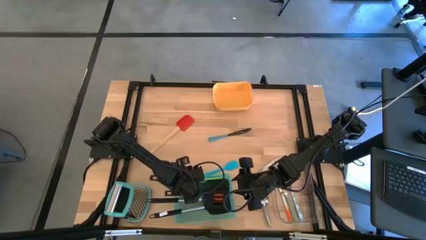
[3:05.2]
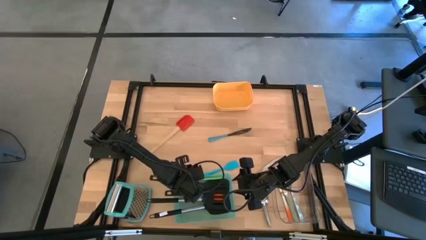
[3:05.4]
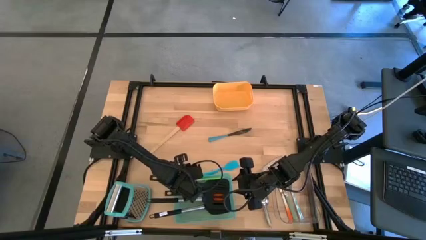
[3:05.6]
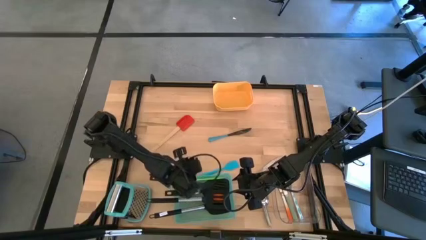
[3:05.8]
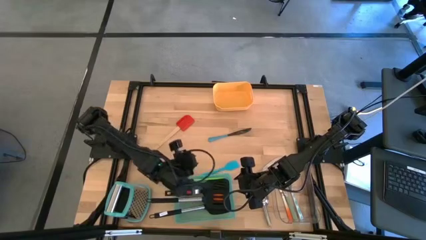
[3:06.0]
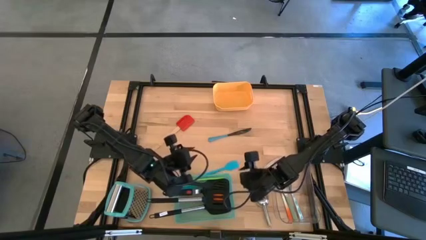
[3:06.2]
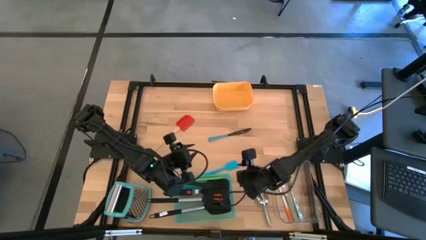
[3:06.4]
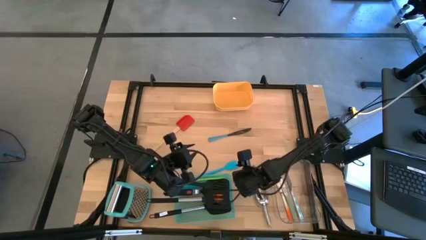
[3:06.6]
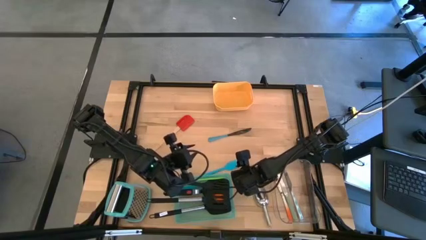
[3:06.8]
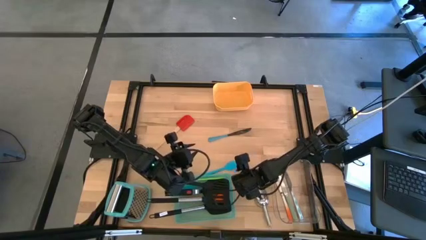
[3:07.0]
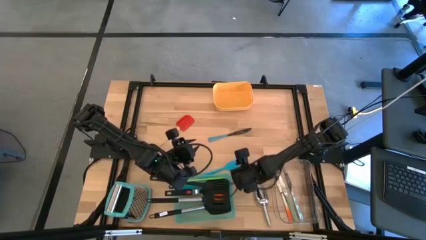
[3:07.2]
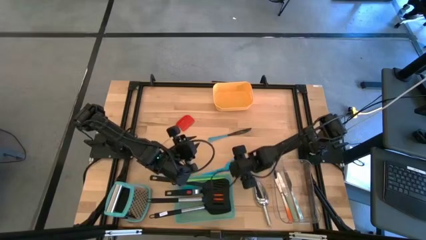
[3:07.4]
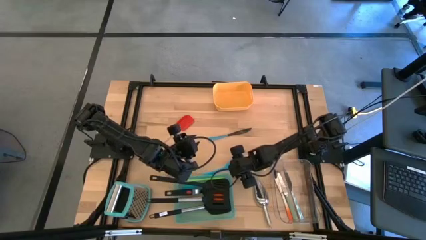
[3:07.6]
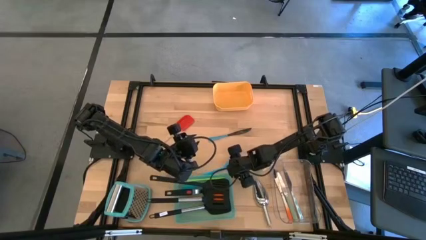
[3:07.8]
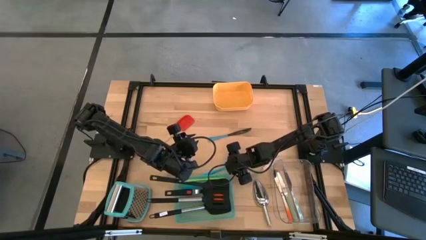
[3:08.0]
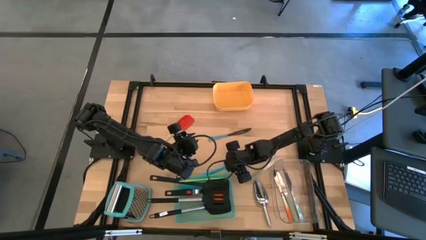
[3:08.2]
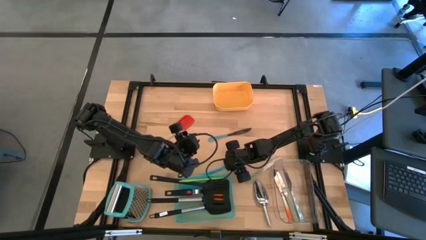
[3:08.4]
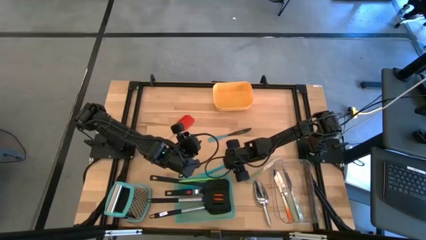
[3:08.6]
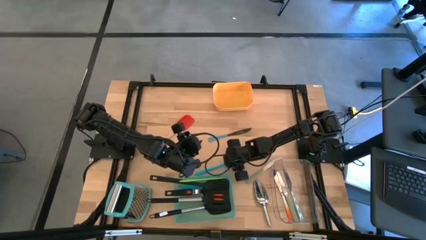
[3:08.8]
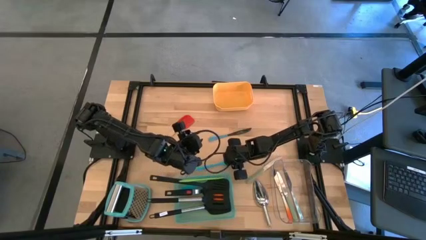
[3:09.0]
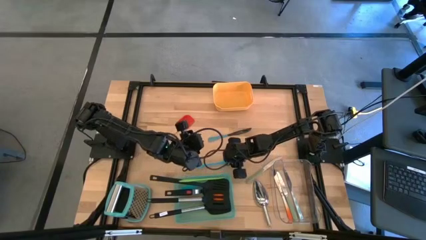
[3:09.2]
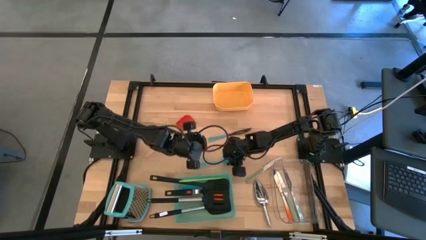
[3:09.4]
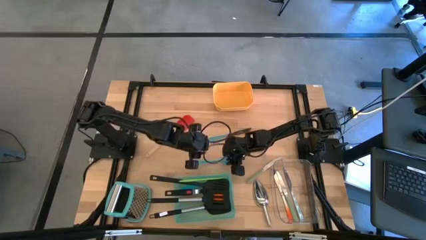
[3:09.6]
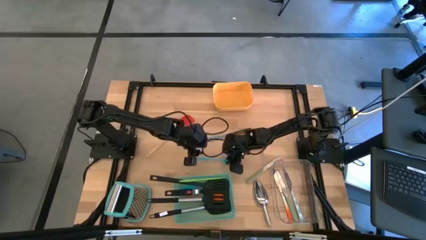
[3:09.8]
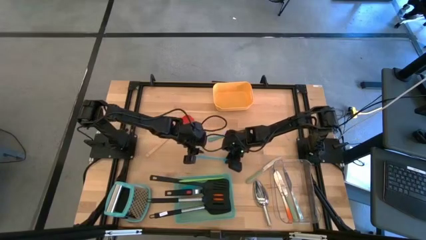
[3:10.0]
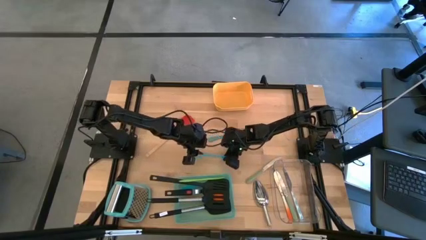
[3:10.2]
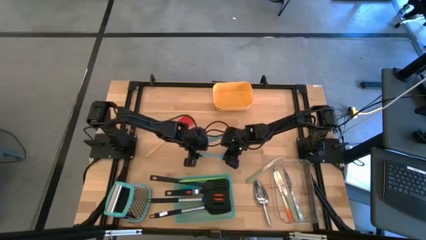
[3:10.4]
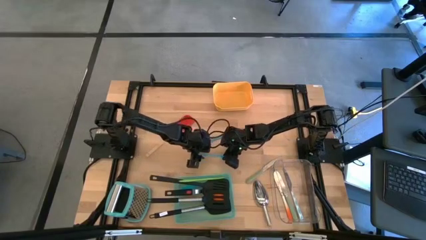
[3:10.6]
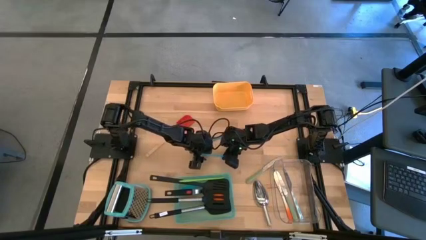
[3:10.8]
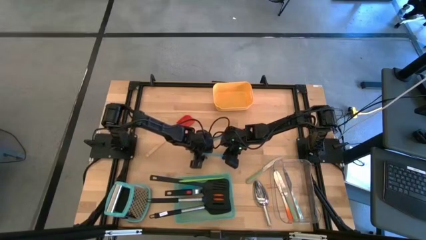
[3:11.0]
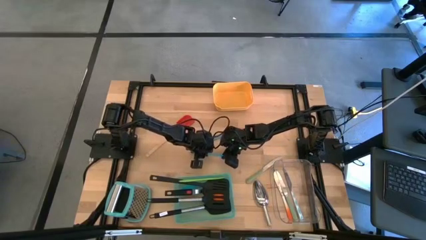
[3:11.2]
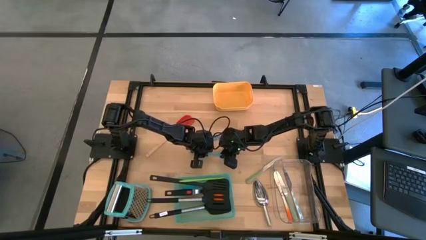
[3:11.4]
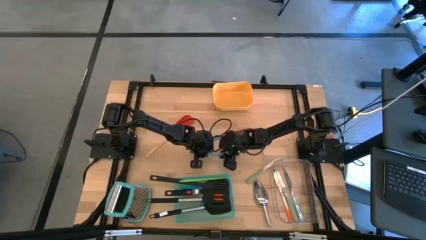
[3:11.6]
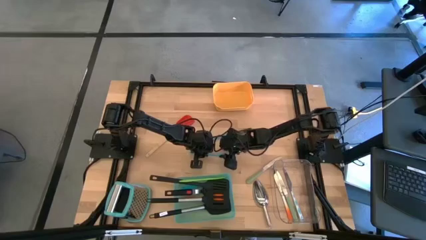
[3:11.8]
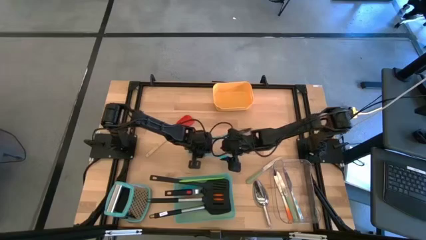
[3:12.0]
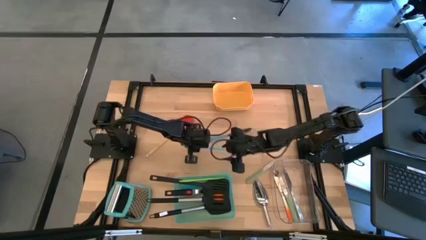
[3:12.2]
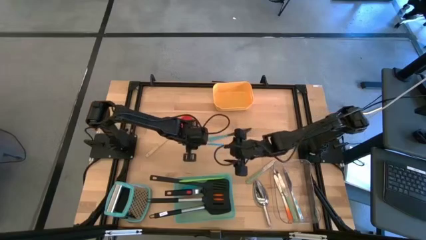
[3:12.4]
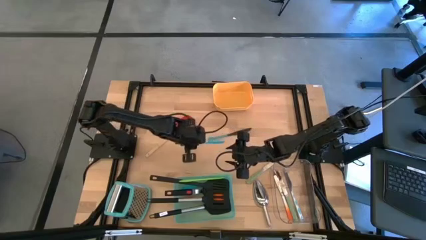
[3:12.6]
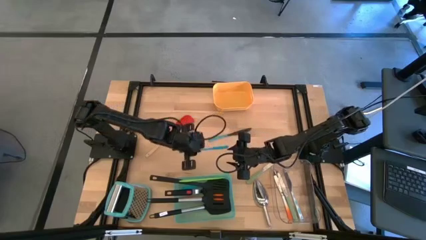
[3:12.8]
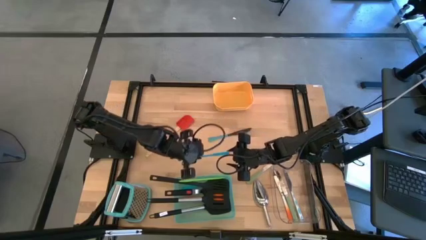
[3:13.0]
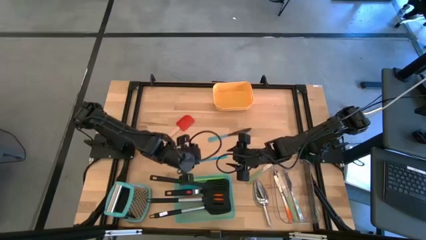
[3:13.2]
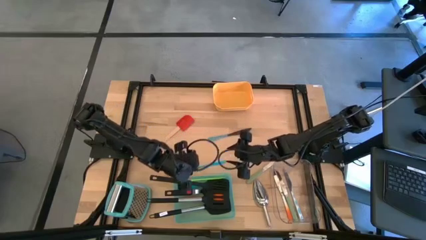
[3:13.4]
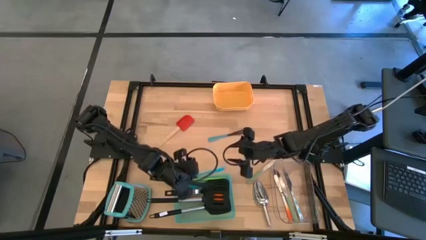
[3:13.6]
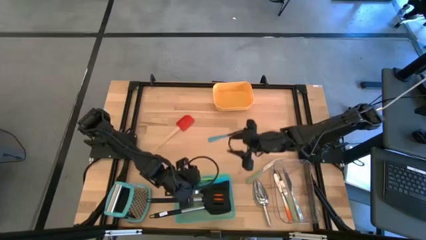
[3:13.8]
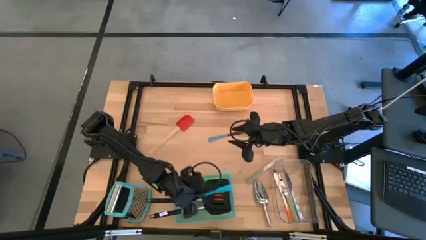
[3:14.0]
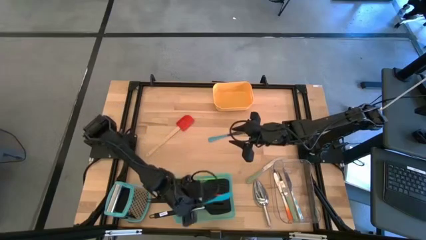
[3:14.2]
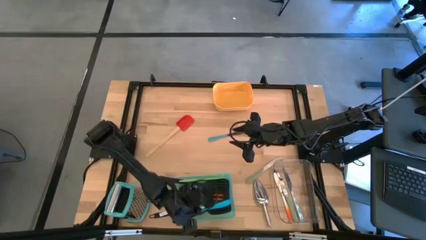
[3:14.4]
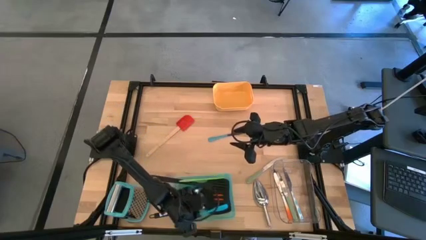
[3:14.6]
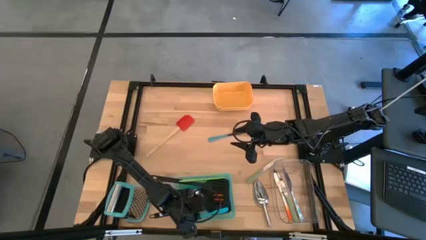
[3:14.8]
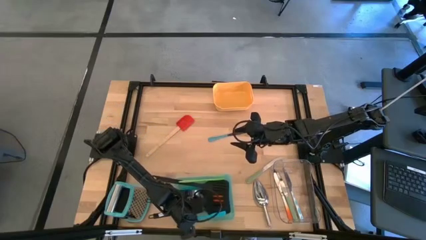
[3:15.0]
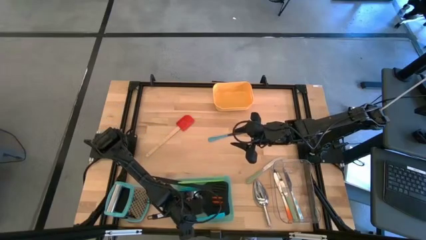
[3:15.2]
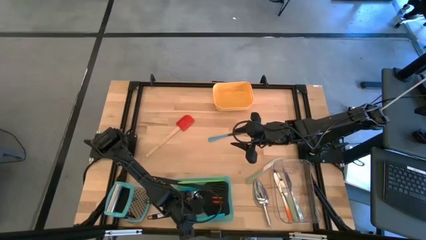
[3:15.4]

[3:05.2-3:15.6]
Task: Pick & Place Kitchen Items
Put the blue spatula into the blue bin

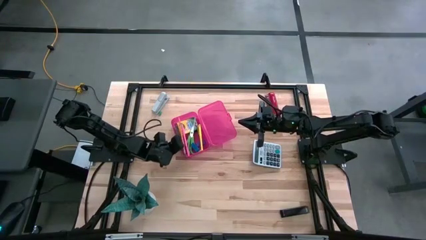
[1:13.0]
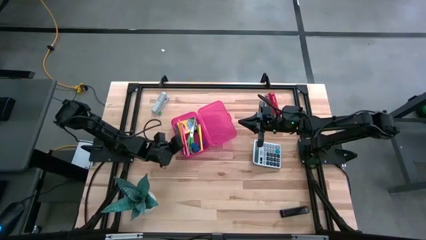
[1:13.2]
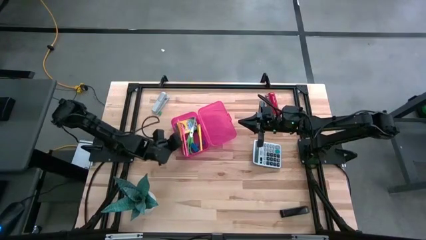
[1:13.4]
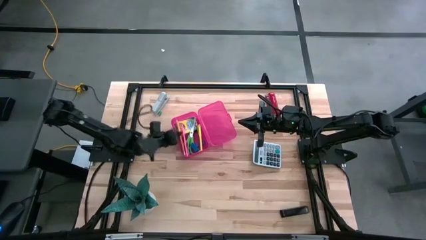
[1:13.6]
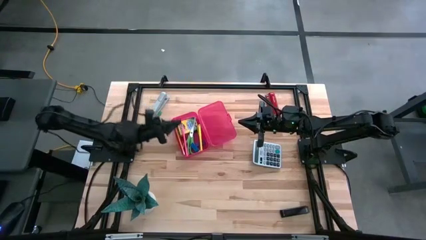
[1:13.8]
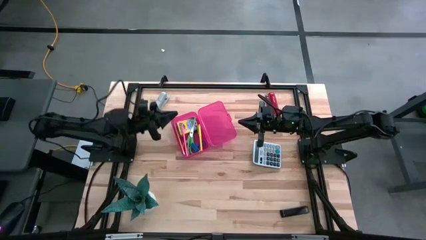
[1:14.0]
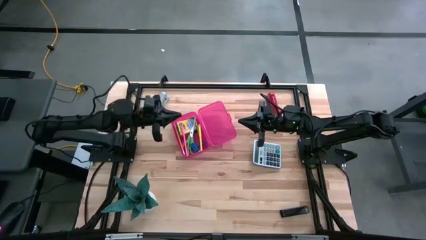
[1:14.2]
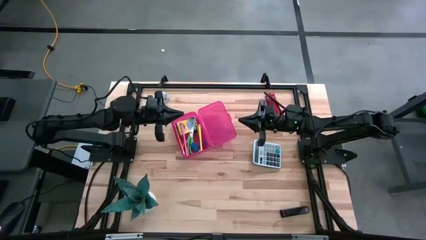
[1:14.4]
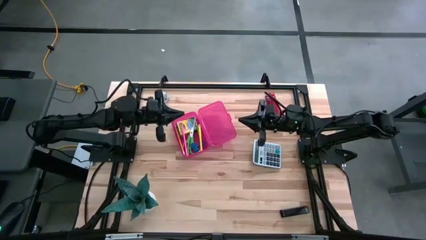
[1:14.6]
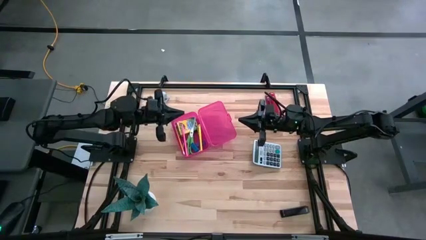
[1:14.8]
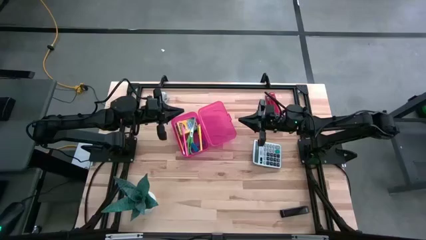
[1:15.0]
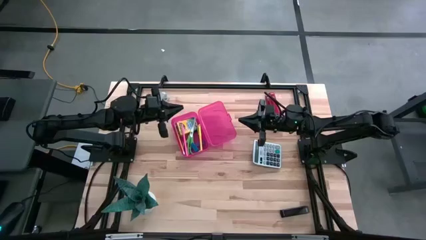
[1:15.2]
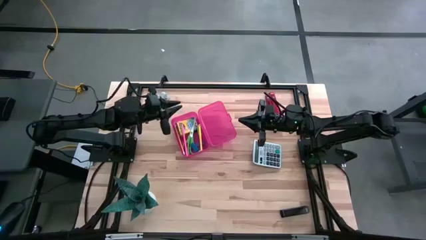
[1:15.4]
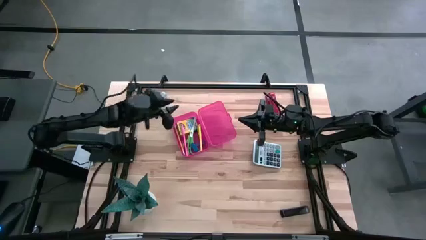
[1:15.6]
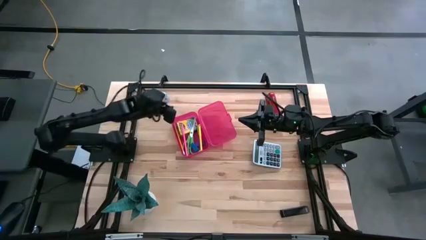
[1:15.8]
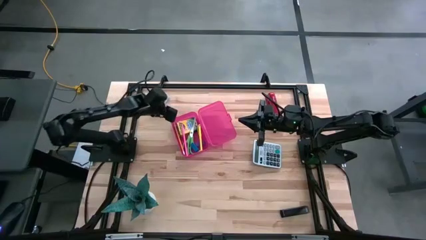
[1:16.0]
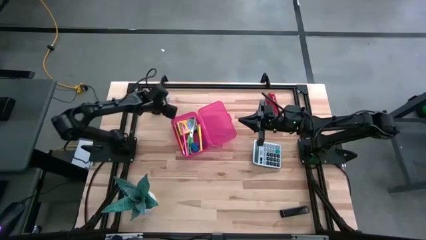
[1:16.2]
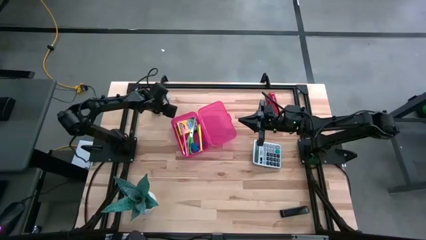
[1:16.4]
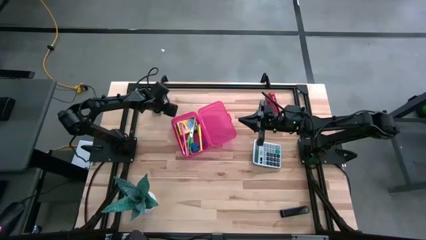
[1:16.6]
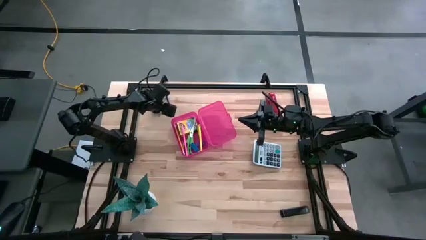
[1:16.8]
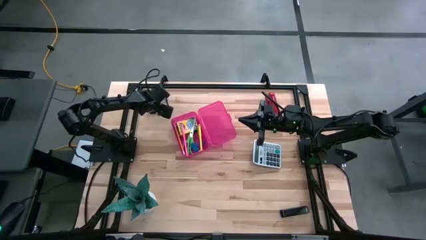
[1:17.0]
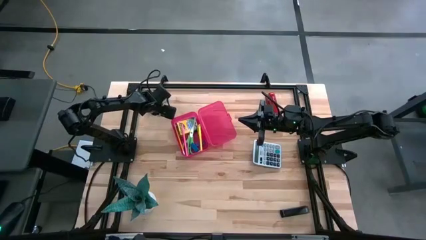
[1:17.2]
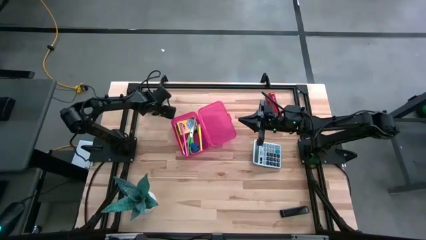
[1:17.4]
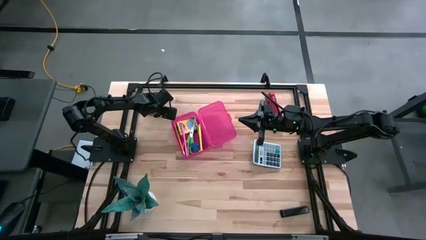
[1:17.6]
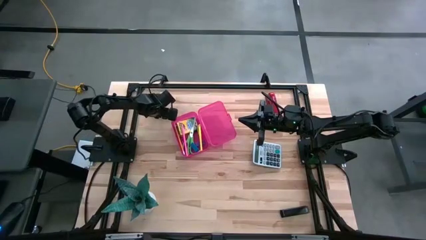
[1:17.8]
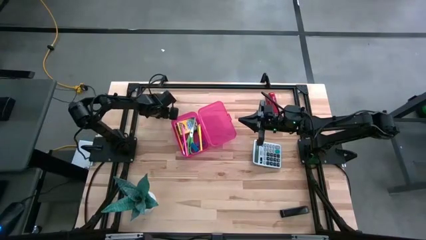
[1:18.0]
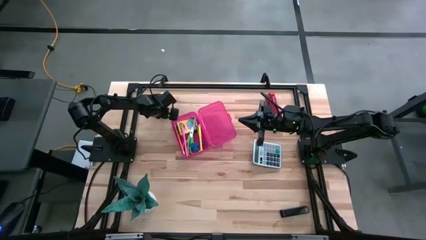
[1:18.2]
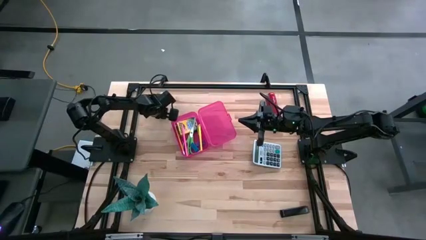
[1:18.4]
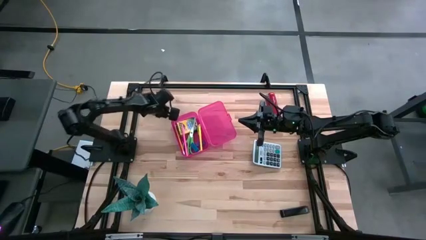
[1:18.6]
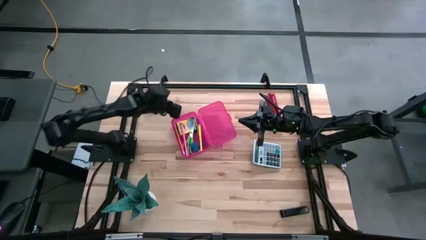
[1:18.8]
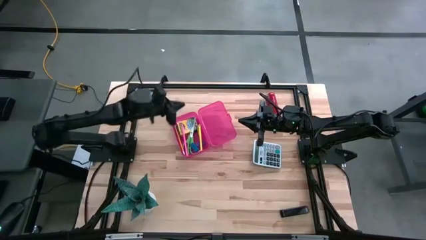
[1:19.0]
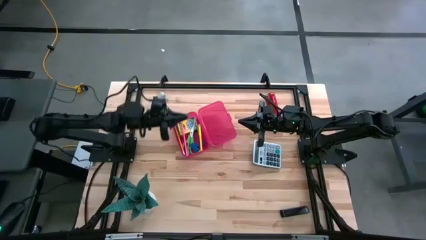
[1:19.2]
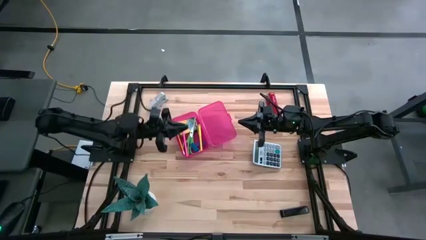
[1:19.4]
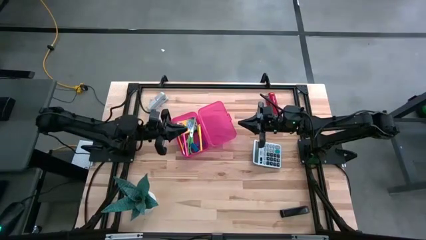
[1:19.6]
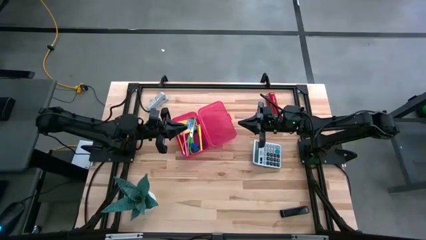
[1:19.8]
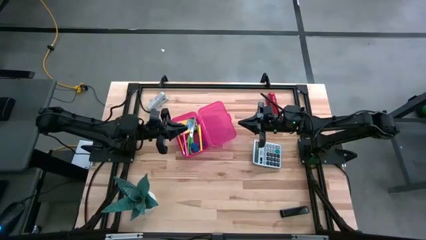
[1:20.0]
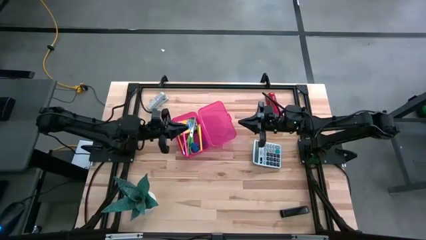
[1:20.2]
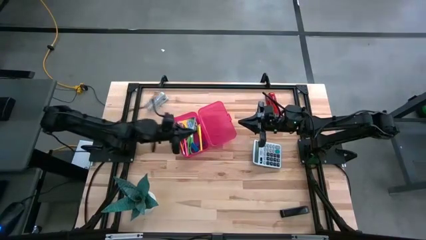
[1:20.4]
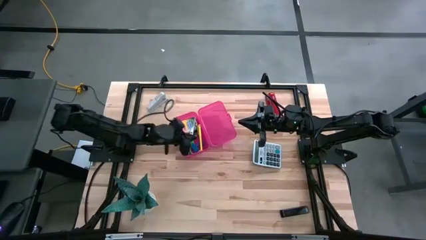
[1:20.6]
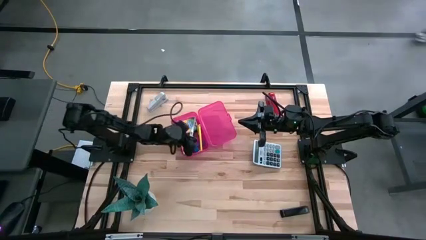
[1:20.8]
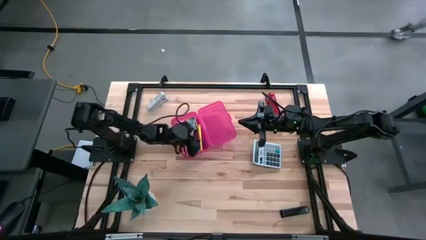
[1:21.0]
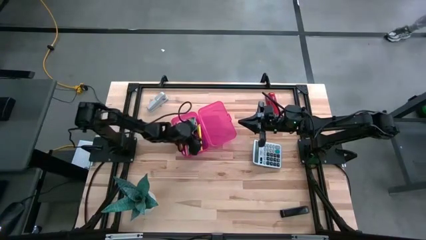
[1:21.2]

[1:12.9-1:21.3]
Task: Pack school essentials
Put the green eraser into the pink pencil box
